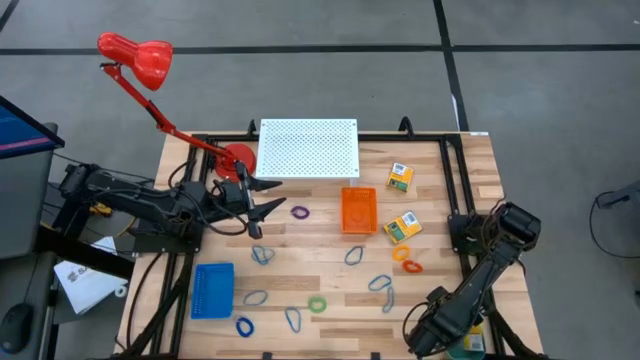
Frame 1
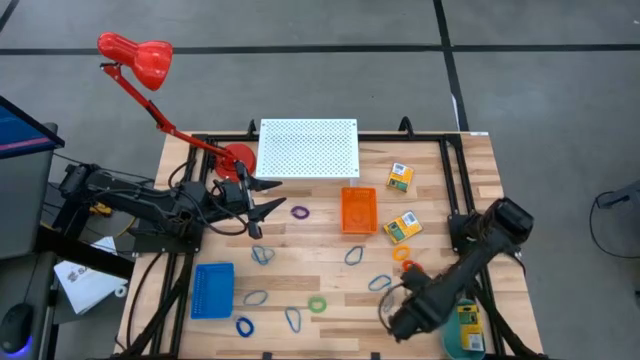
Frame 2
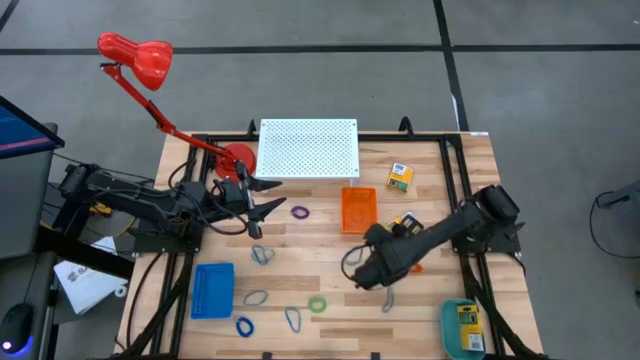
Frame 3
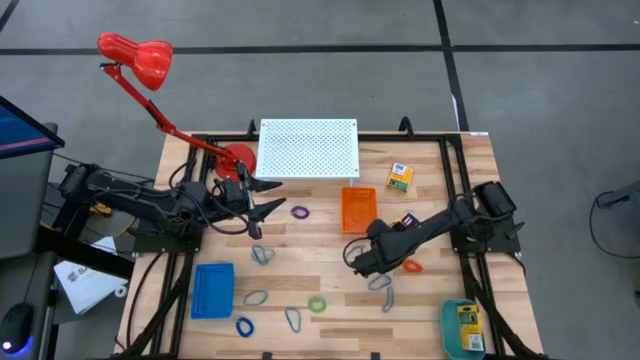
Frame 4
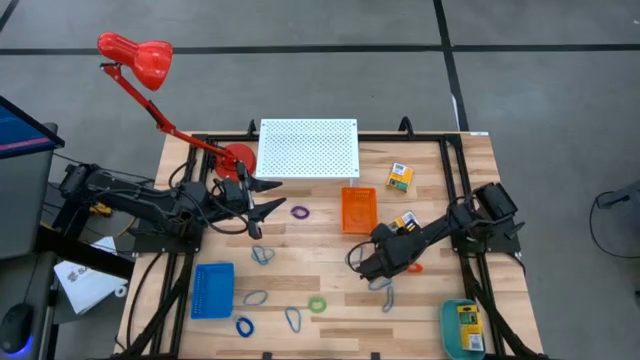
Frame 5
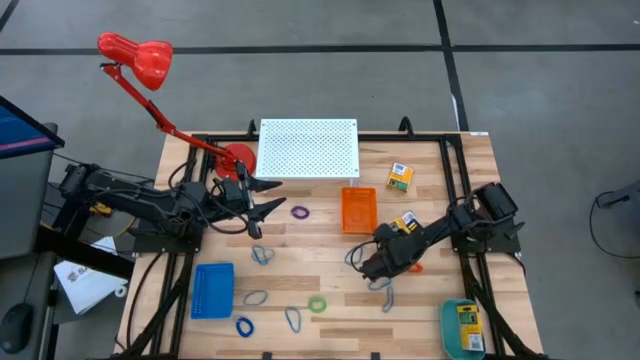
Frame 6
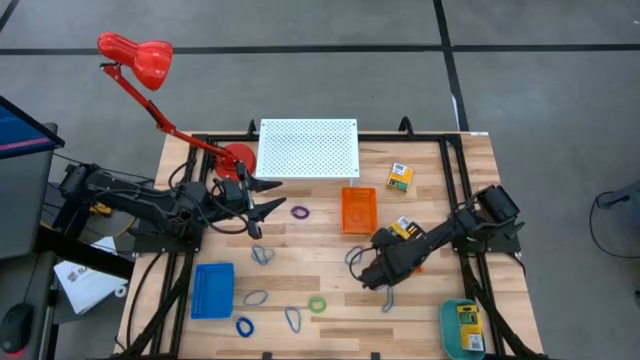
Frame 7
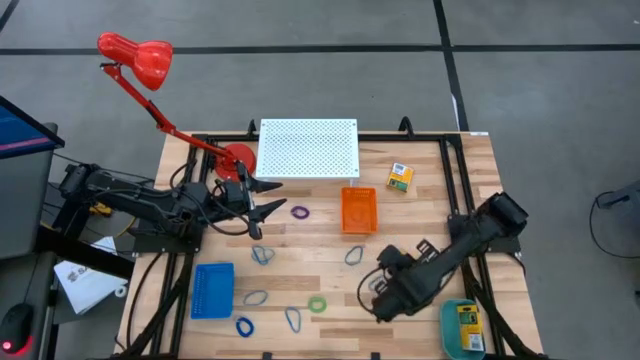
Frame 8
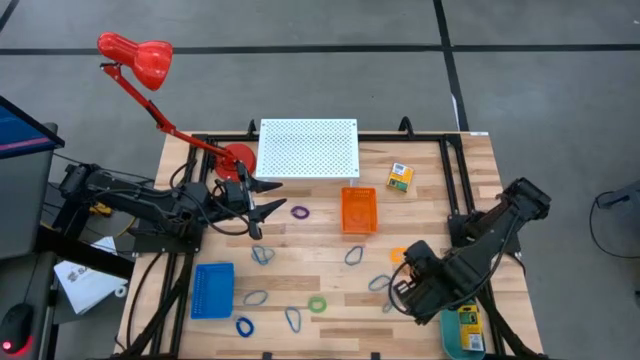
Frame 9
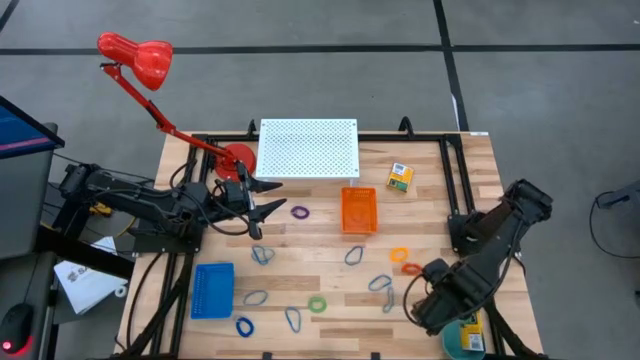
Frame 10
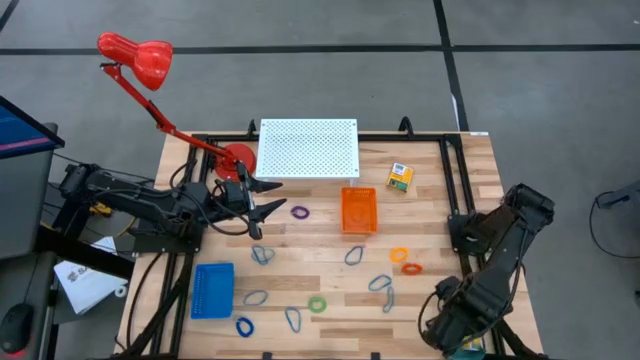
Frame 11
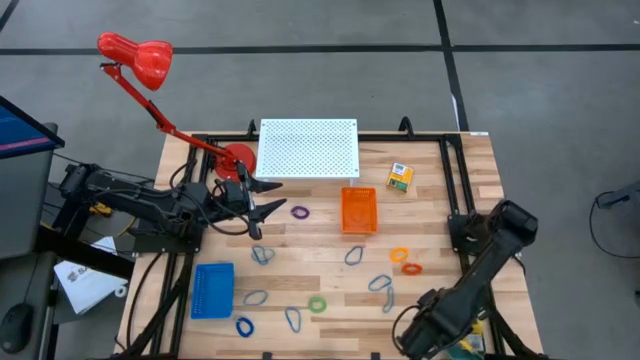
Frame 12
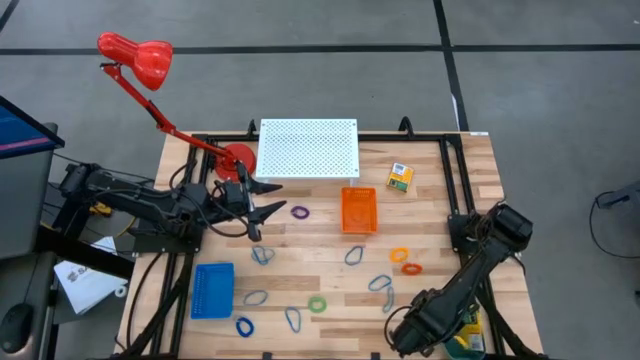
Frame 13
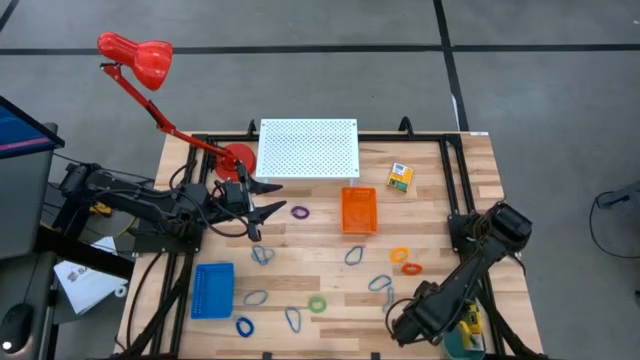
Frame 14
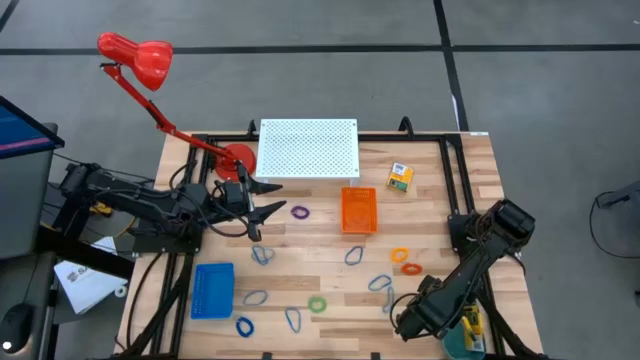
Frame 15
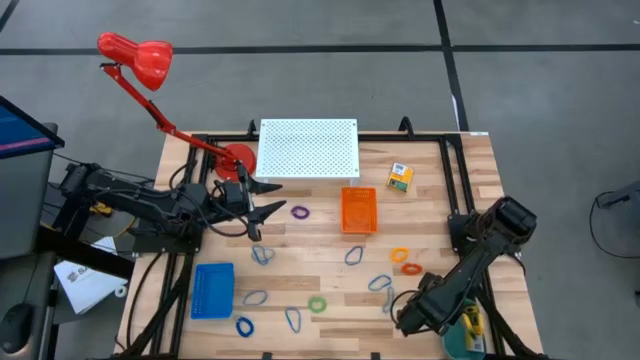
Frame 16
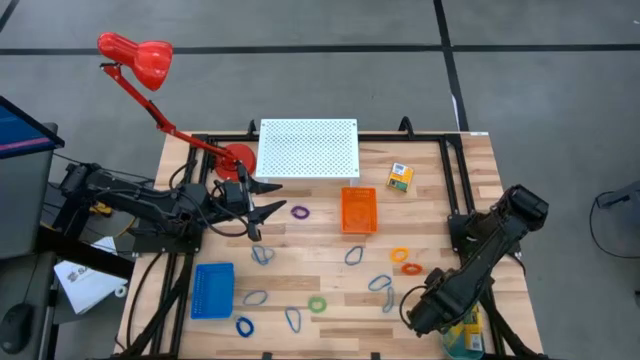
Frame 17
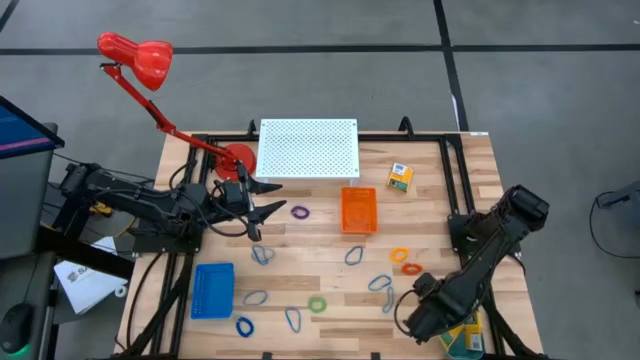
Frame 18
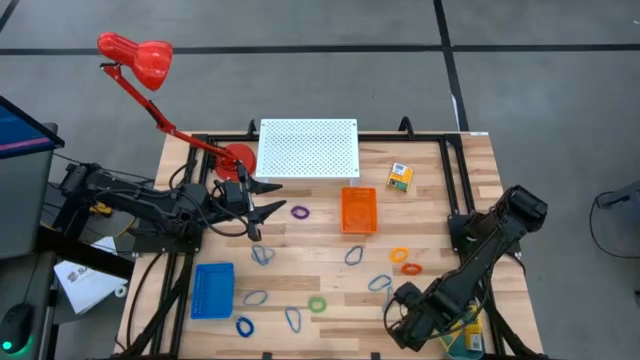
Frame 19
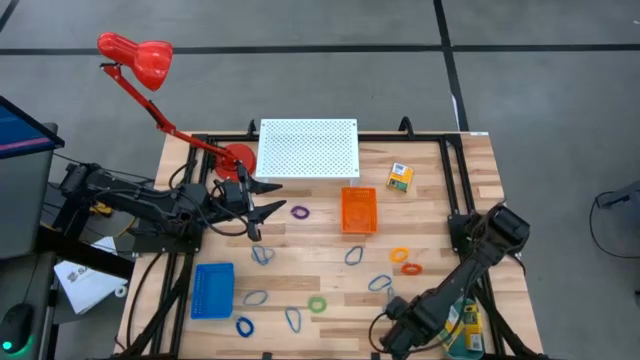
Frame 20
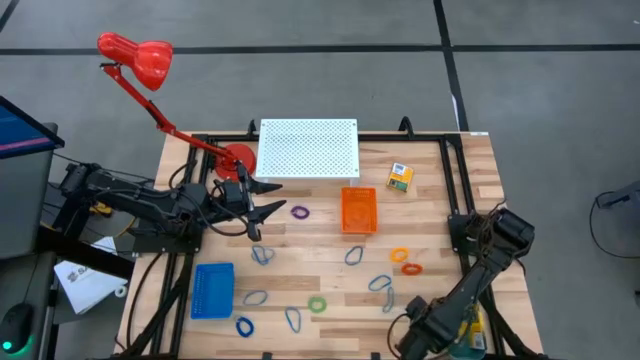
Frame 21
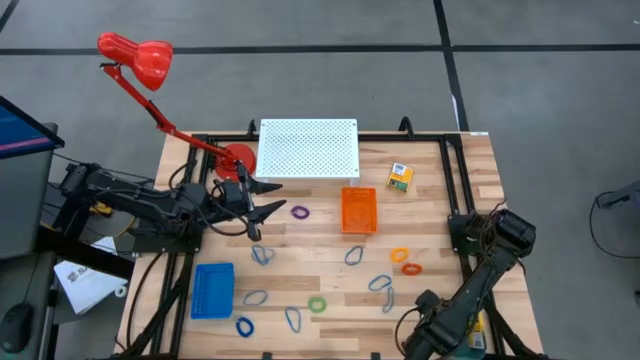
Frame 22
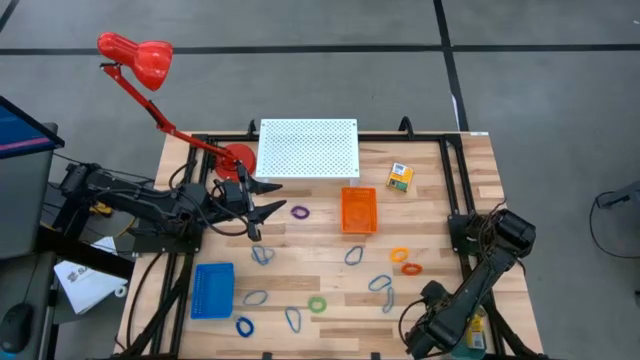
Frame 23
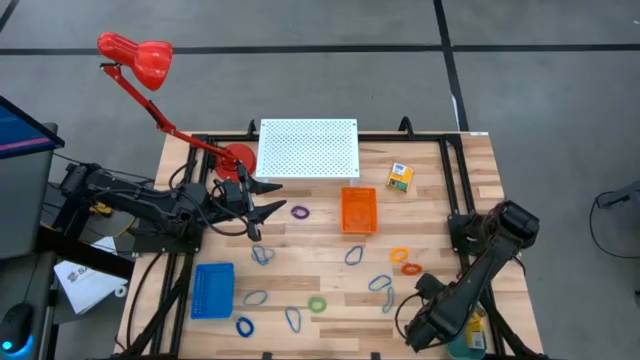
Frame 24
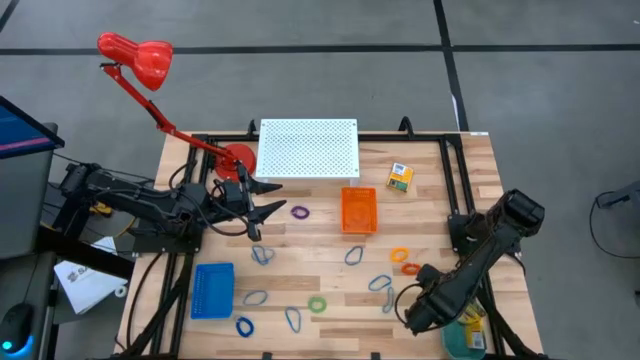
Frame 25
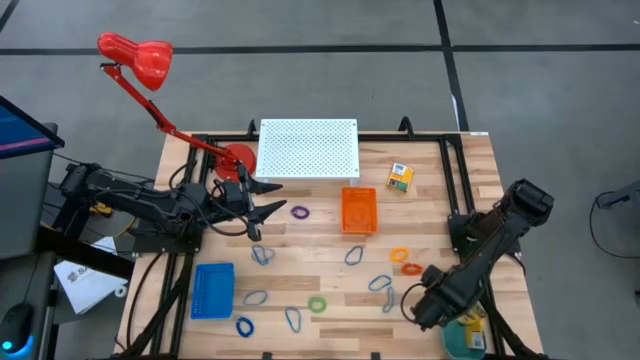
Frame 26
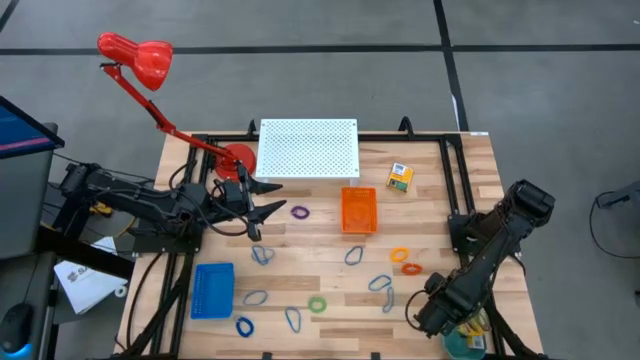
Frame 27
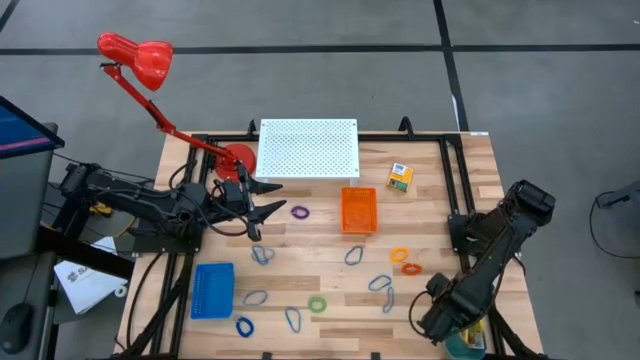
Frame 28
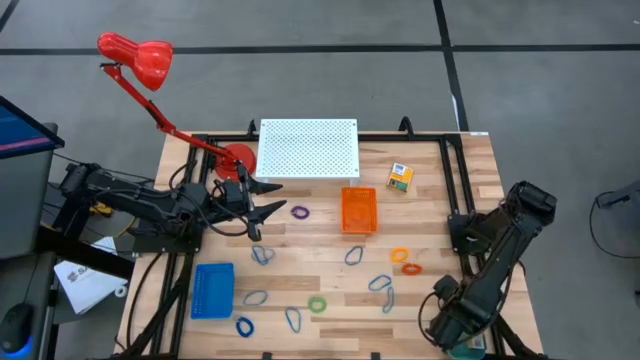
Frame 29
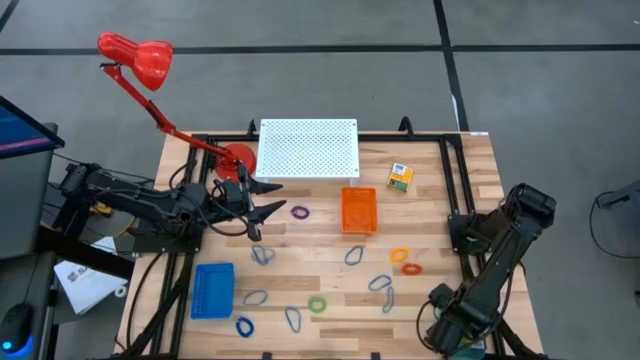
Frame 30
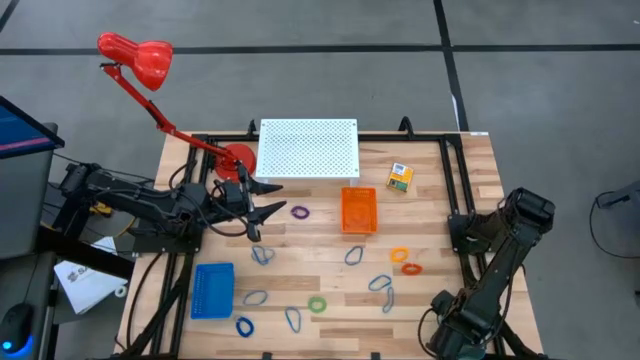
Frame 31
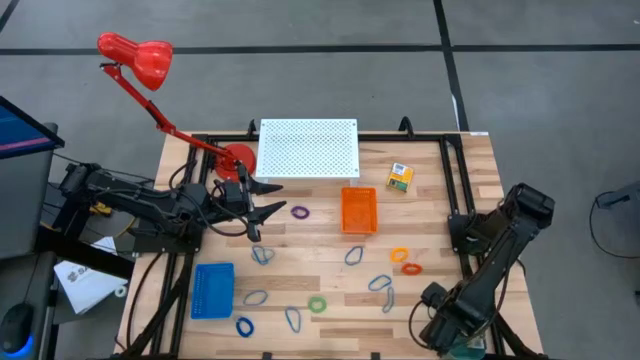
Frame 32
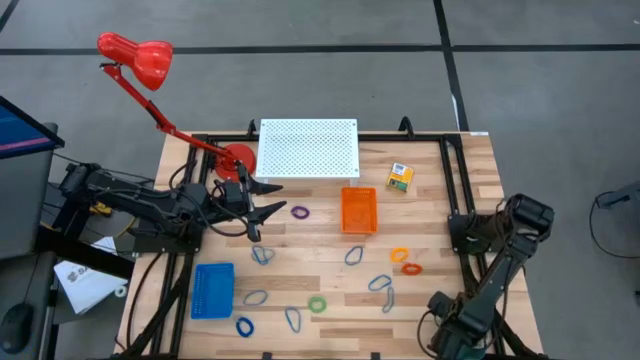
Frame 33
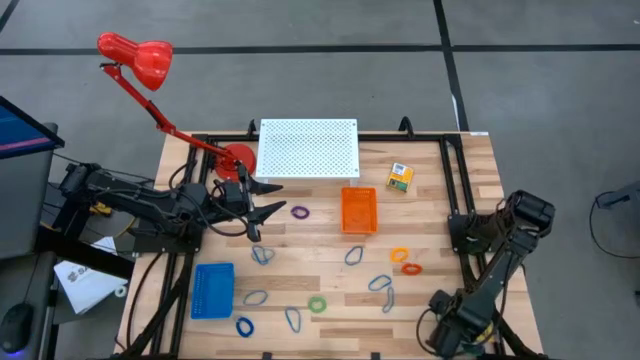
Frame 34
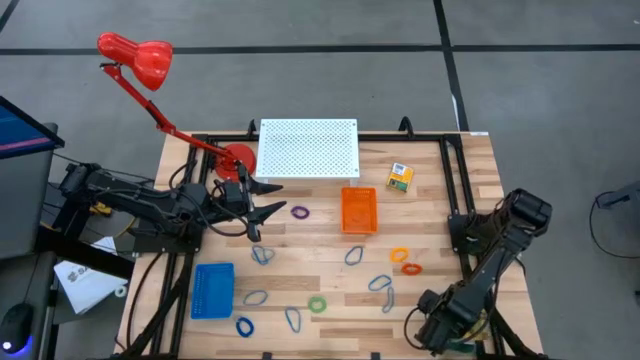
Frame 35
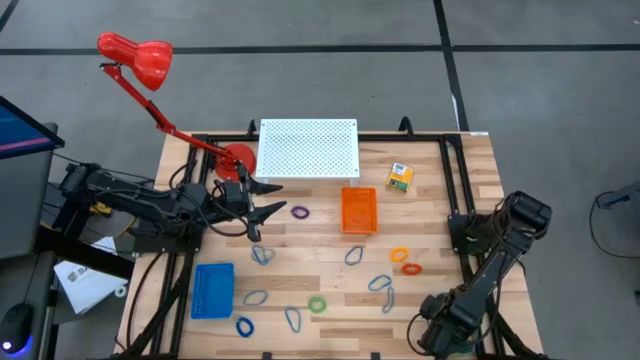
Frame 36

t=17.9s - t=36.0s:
Task: Pick & Place Office Desk Supplies
Put the bottom yellow crayon box into the bin

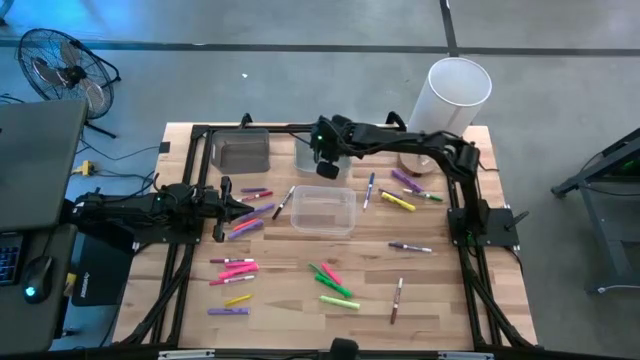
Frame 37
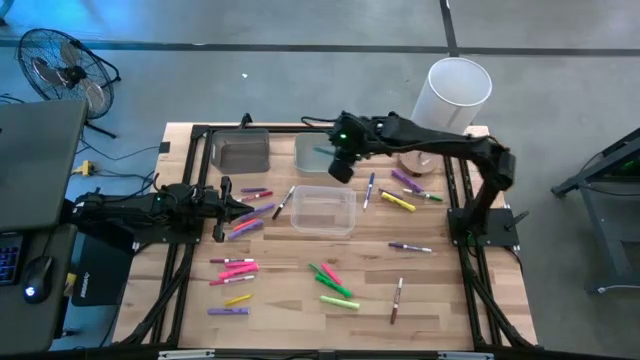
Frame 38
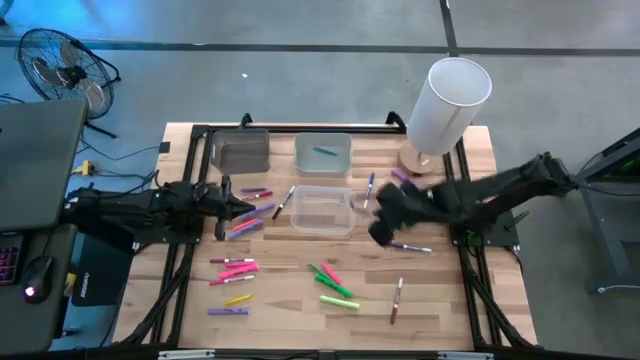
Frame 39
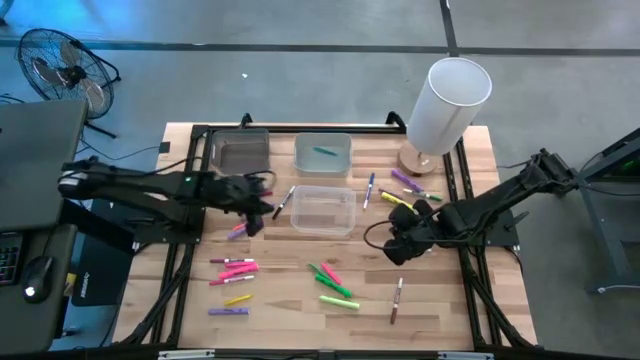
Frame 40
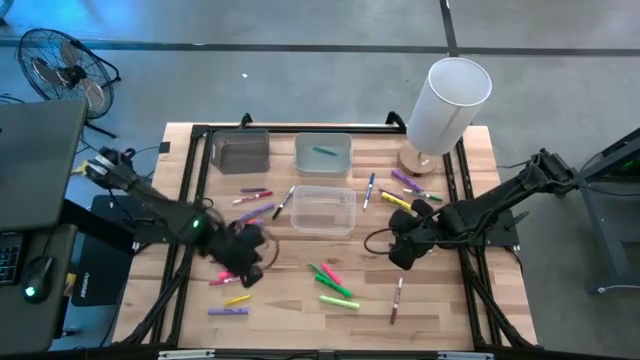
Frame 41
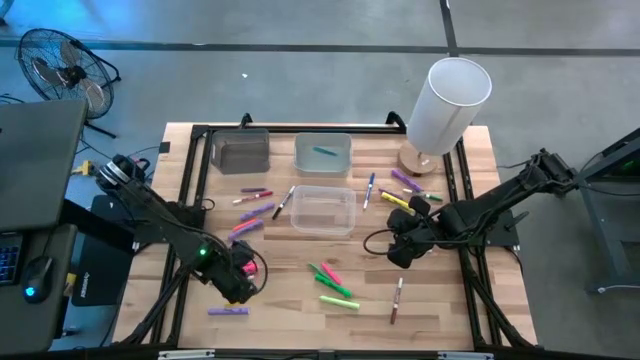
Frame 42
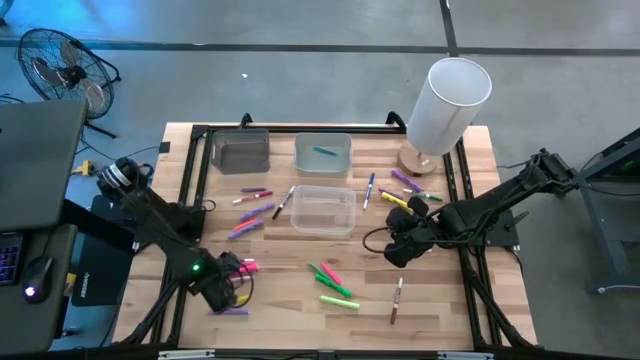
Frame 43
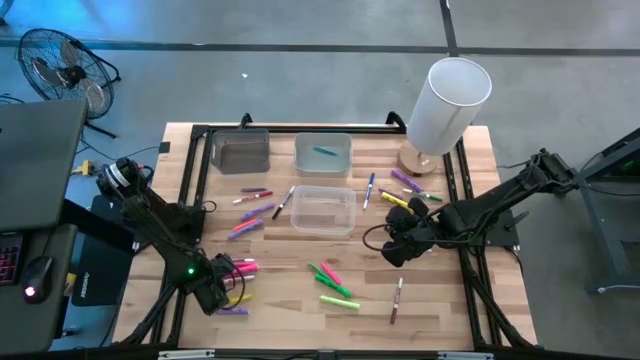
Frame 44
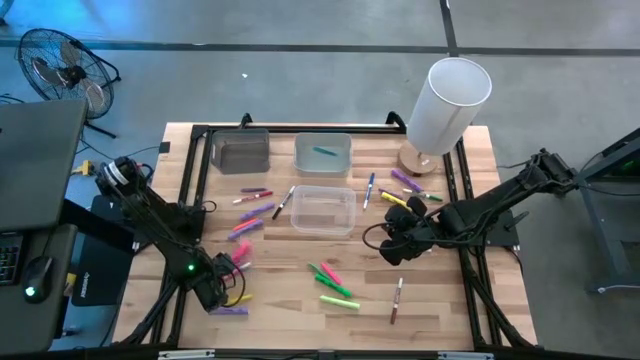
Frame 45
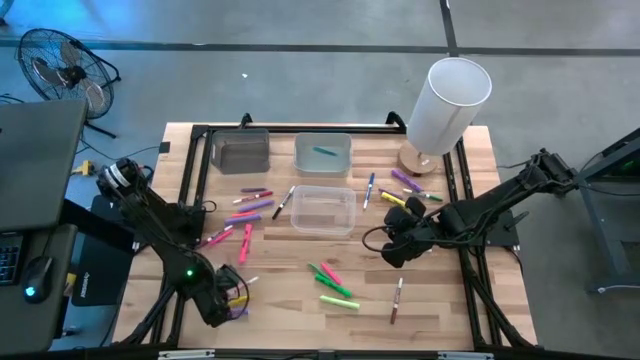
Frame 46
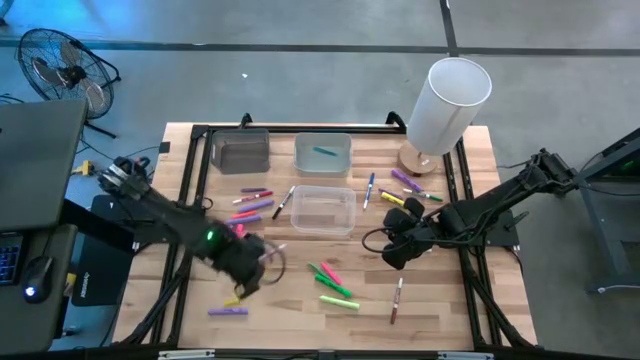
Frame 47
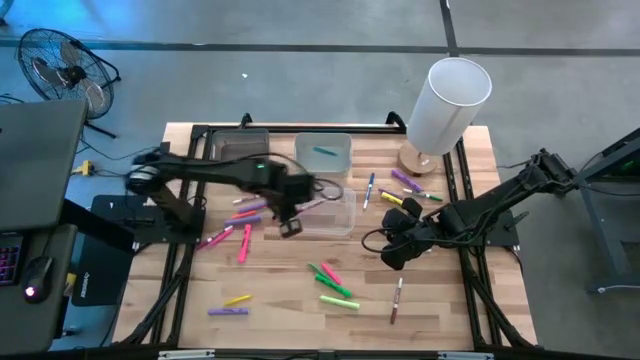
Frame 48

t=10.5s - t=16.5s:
Task: Pick & Place Markers
Put the pink marker into the white bin
